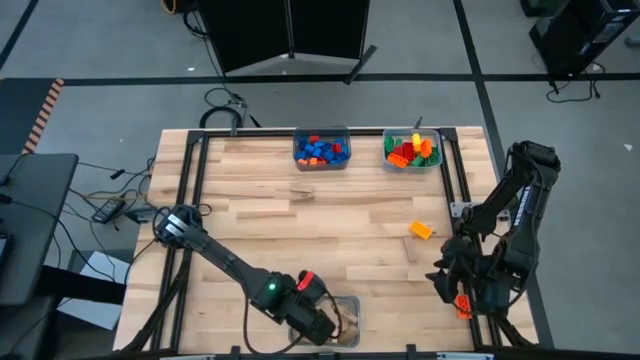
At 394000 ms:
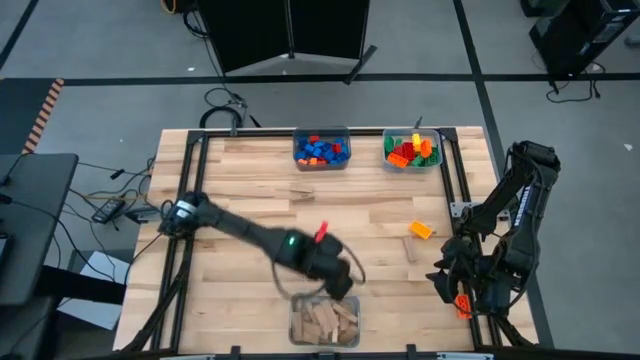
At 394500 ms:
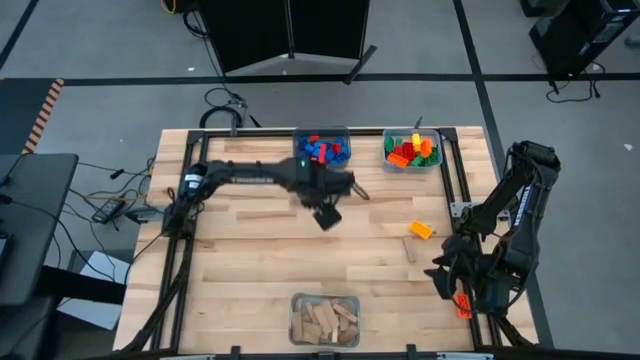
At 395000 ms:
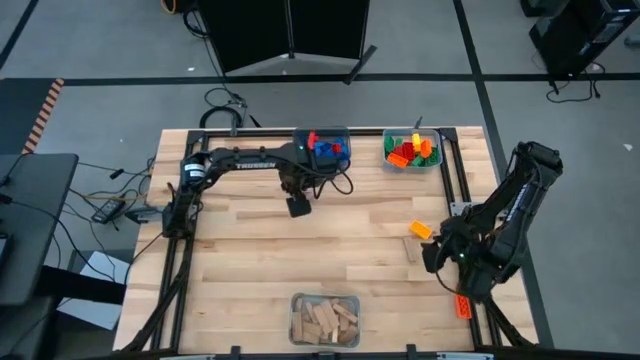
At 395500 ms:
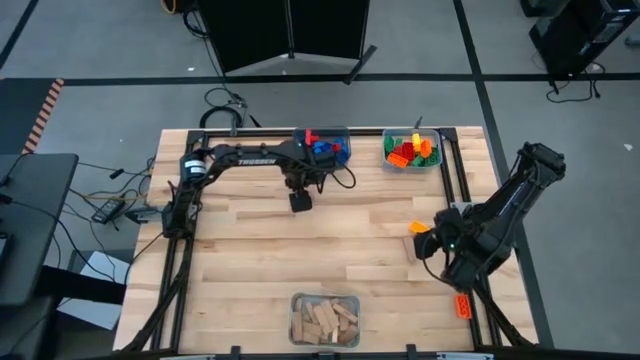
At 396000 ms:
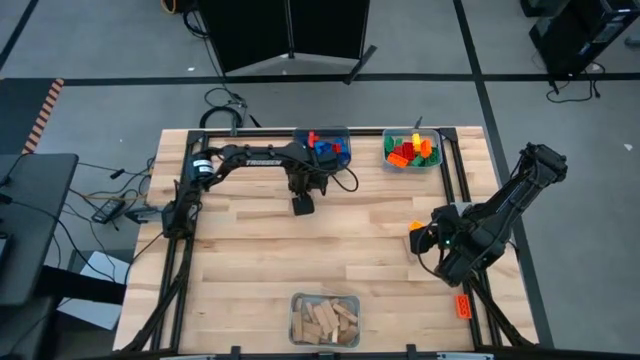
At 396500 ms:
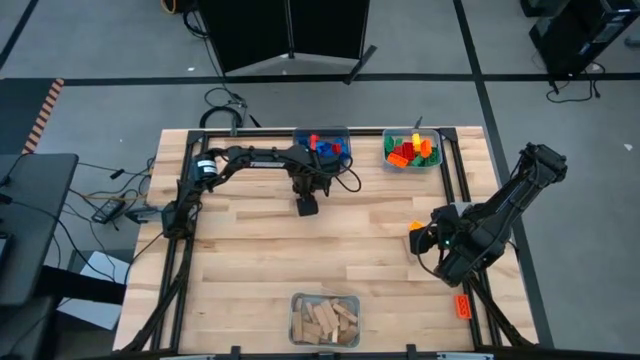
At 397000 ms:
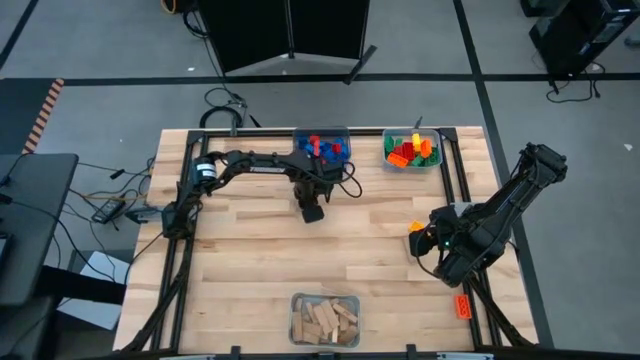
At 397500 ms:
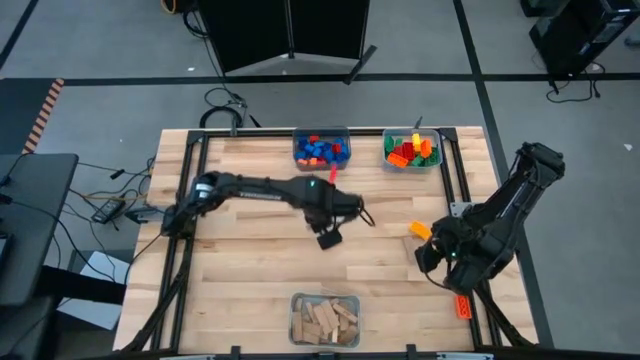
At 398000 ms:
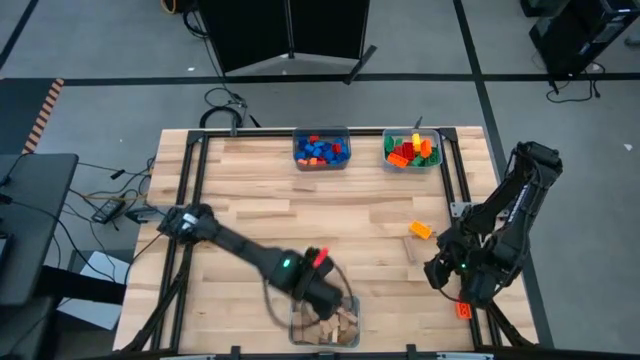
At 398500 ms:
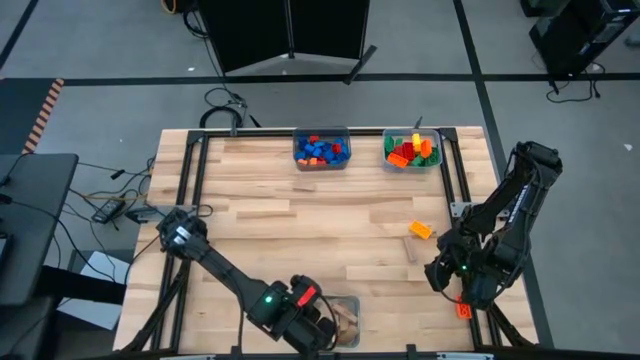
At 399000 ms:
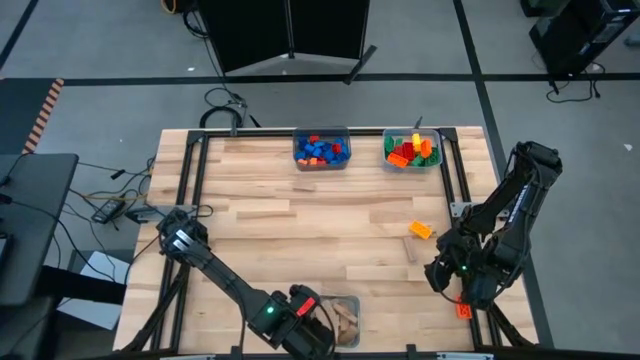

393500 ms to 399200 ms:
Task: Sort blocks by size
Put the brown block into the gray bin

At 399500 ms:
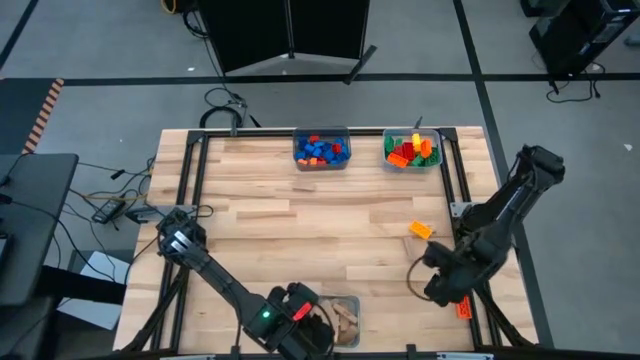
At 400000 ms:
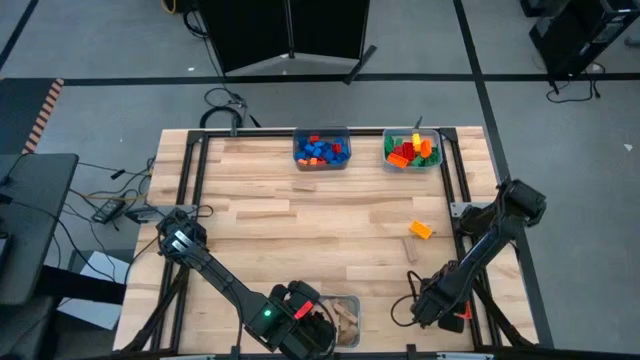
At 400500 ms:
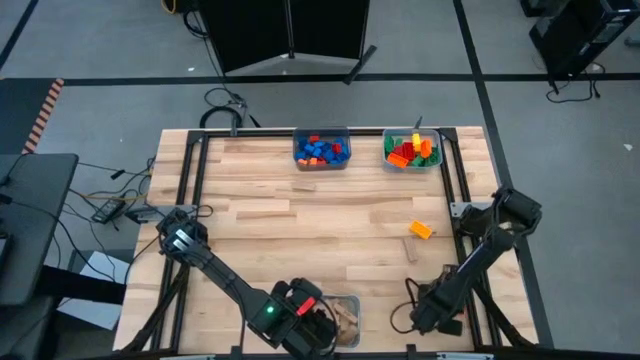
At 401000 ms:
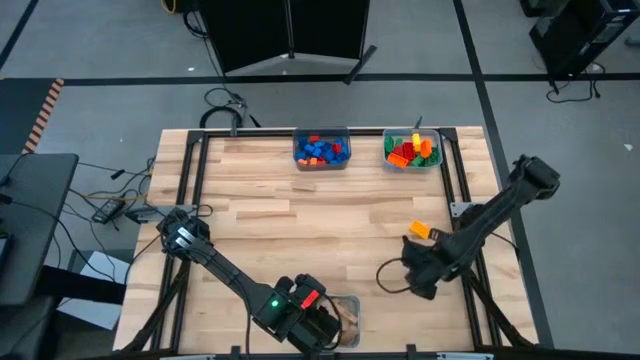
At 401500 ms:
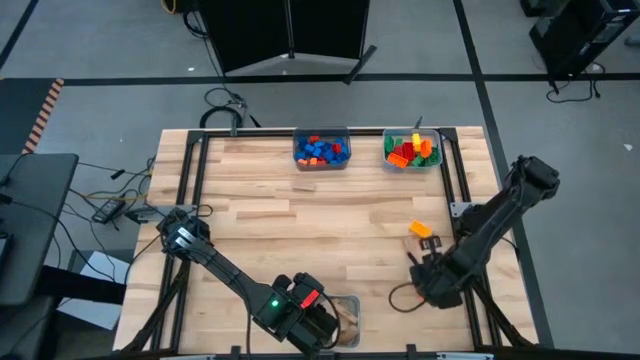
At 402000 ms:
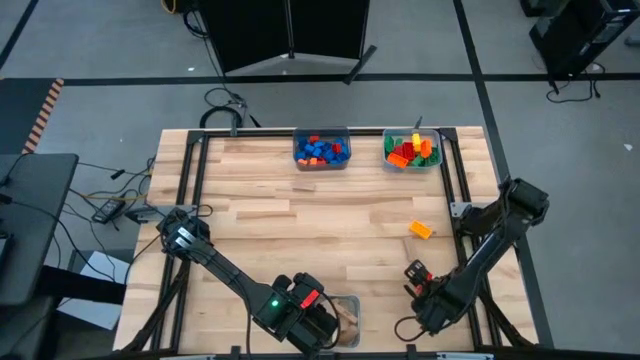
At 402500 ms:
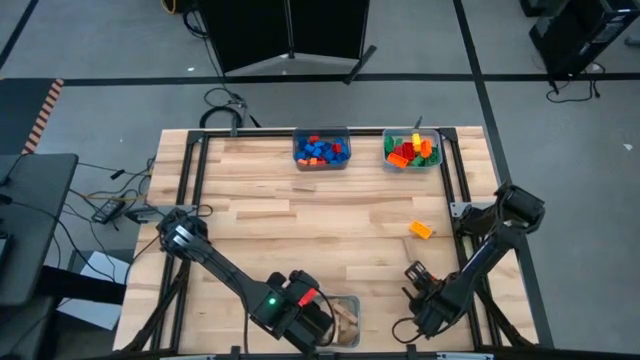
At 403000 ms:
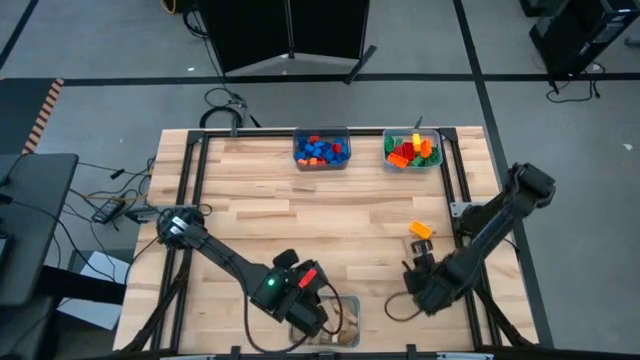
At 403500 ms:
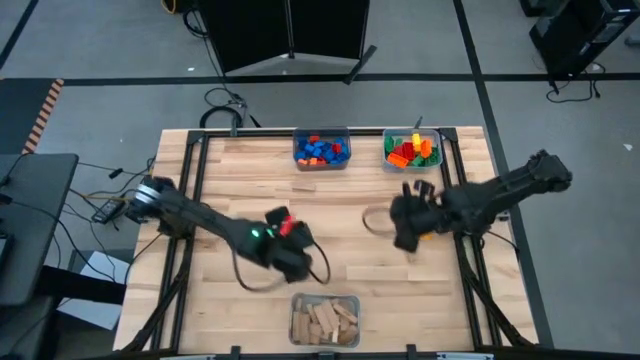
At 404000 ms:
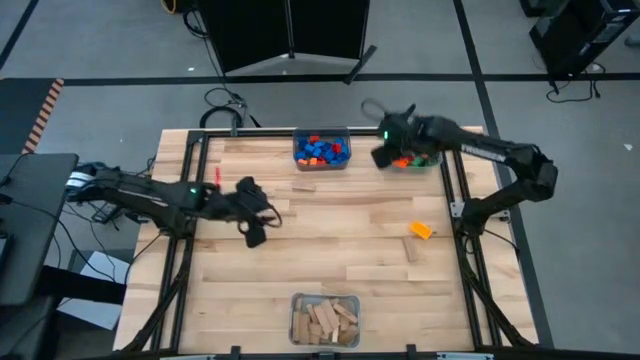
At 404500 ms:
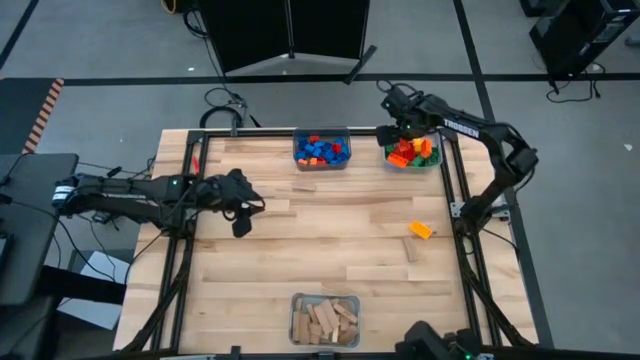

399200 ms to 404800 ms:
Put the large orange game piece into the transparent bin

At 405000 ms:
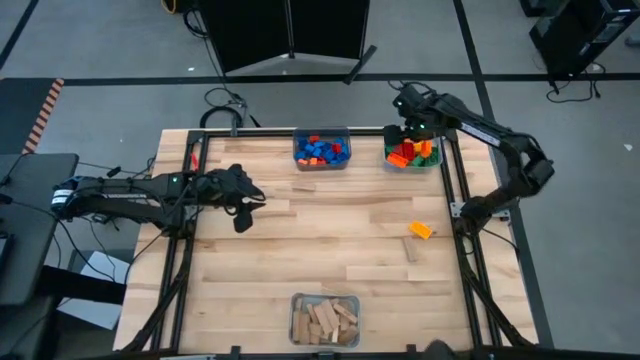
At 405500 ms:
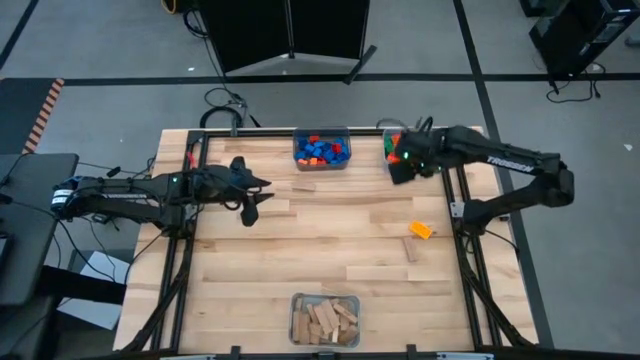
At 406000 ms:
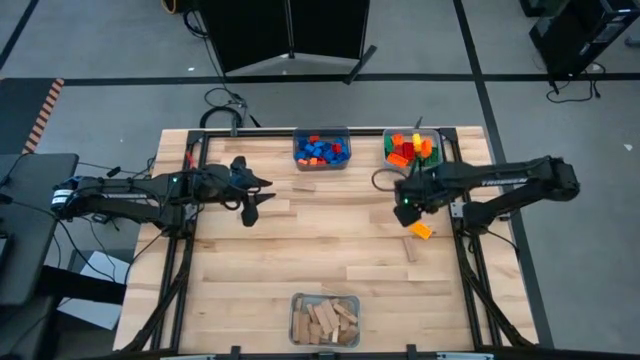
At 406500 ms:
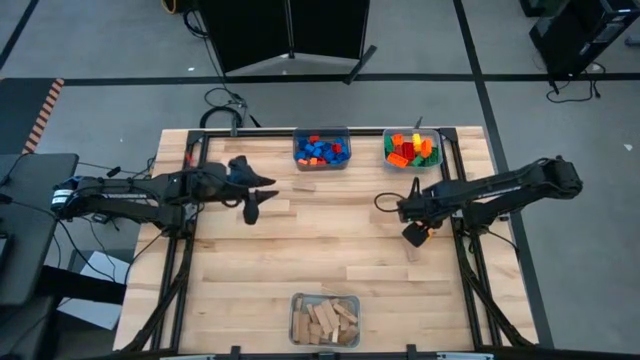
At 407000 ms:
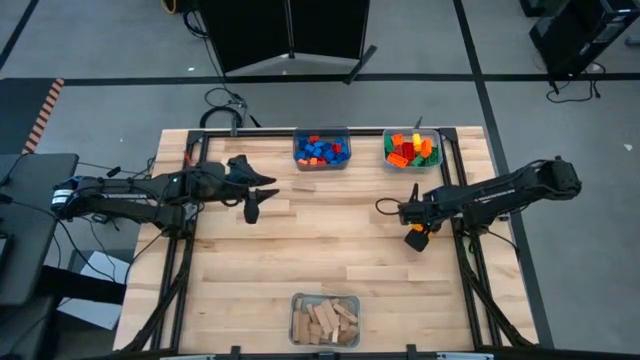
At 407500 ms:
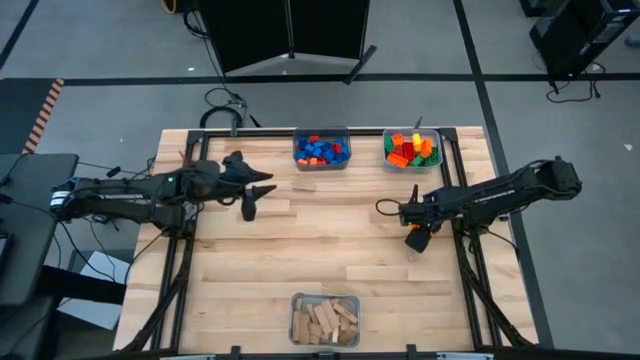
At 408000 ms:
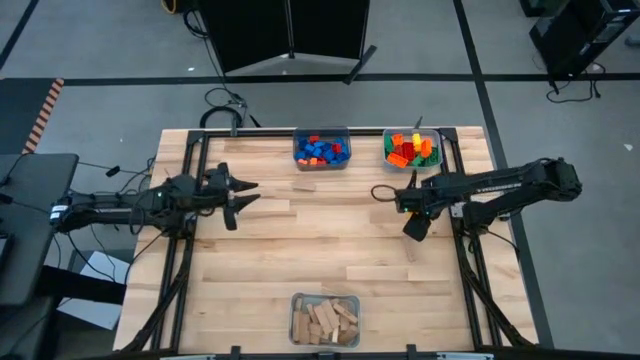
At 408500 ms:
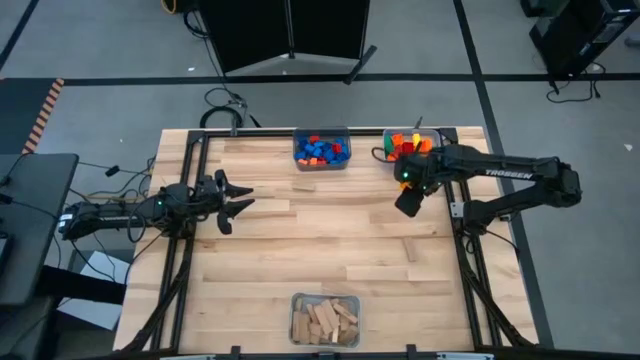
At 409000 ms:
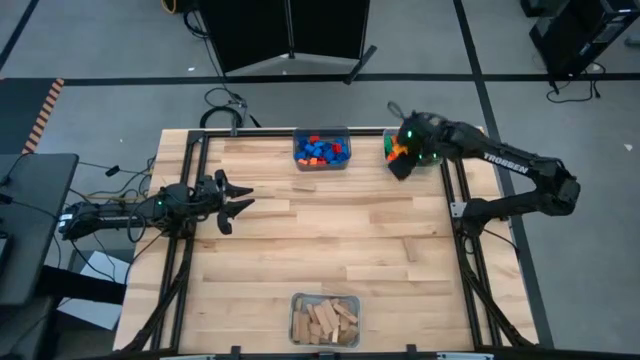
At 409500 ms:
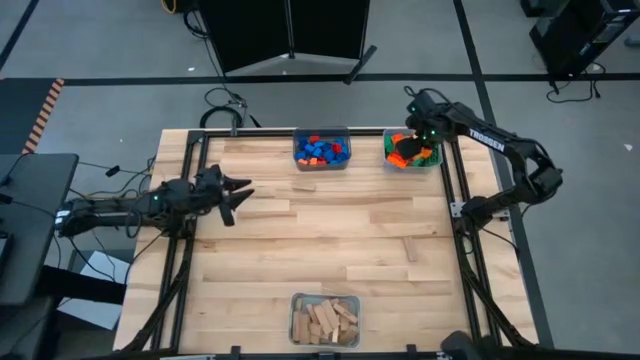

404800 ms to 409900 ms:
Put the large yellow game piece into the transparent bin

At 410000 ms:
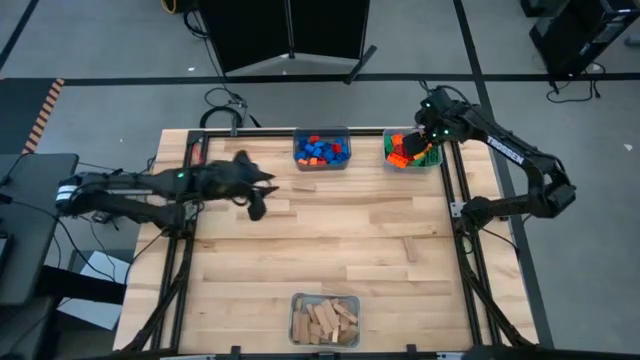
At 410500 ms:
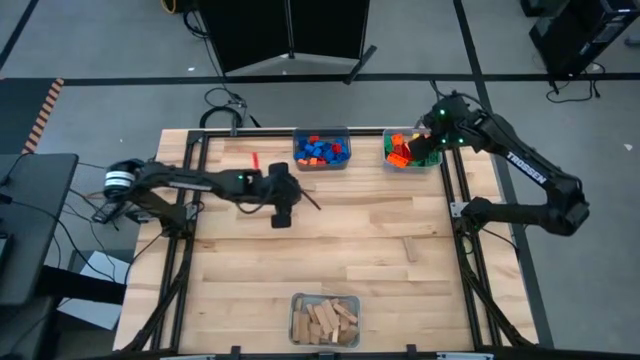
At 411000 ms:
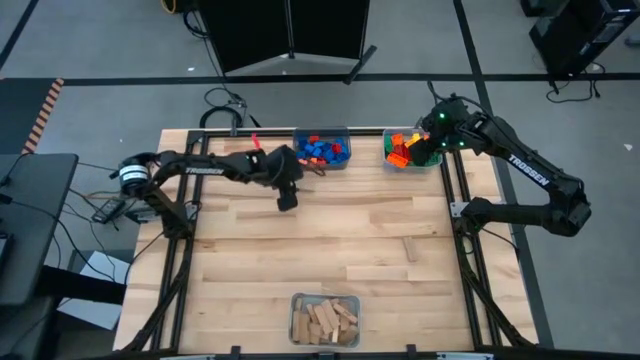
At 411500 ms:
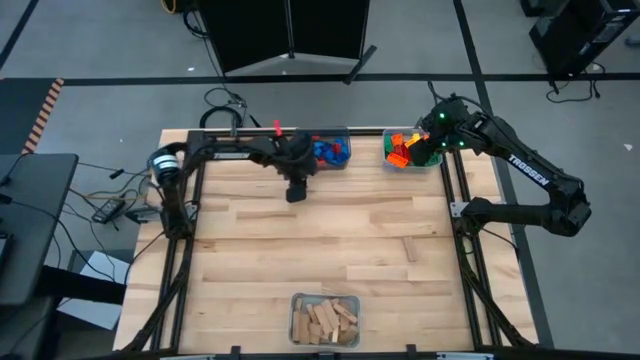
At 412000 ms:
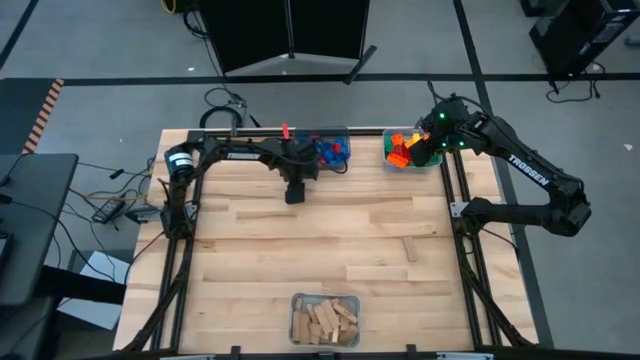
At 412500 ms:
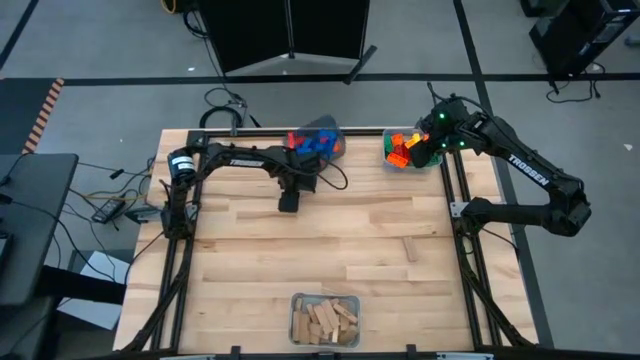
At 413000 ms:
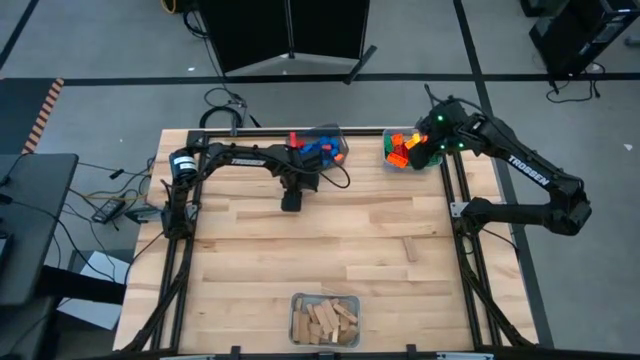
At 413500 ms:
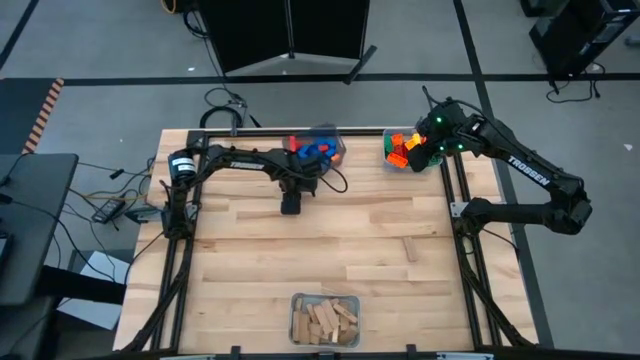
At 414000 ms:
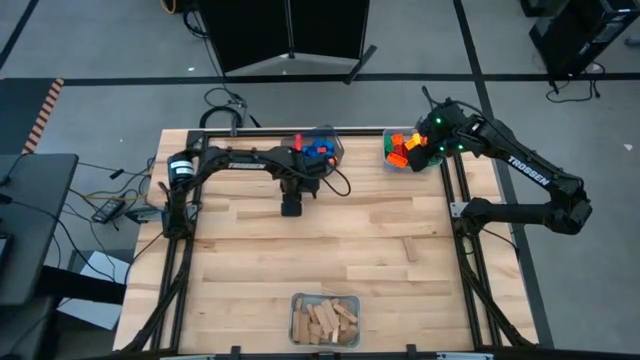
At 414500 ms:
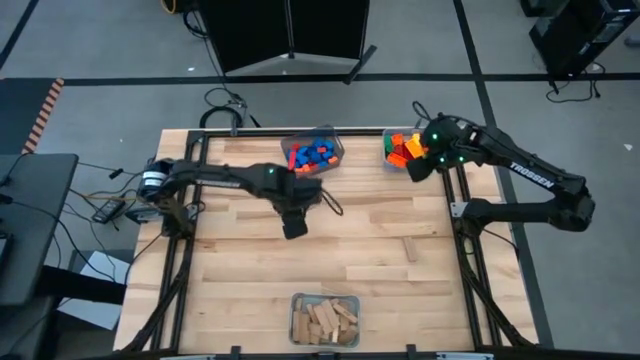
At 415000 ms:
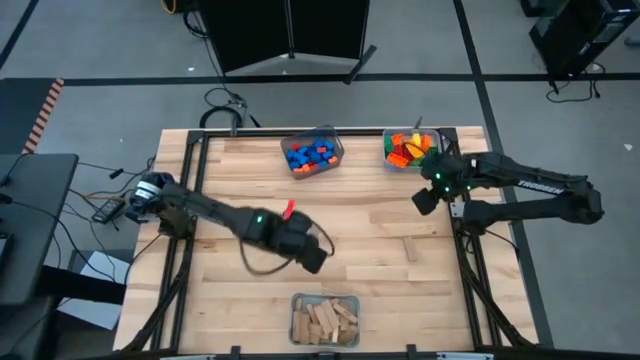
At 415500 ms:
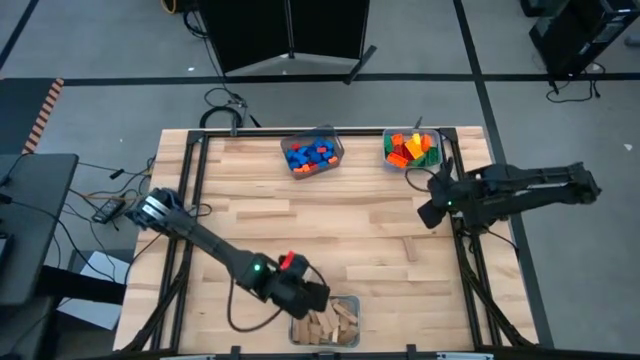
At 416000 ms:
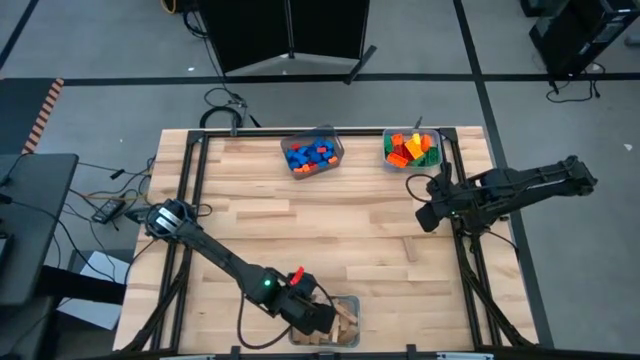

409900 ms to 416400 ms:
Put the brown block into the gray bin
